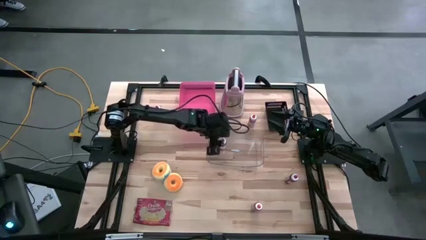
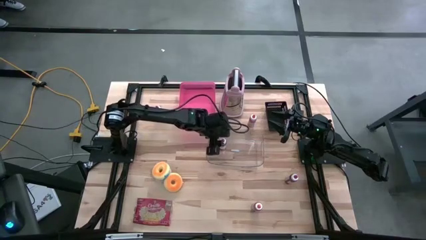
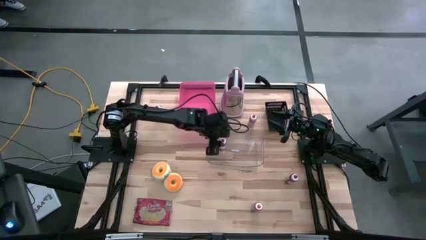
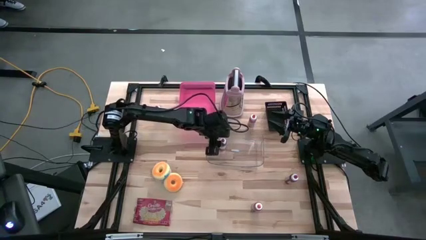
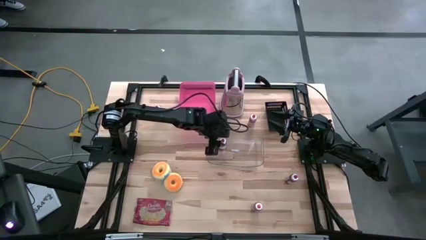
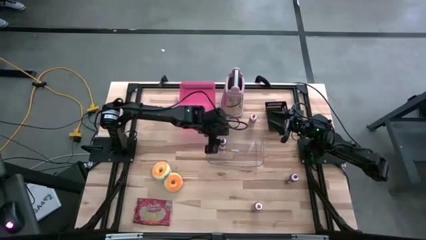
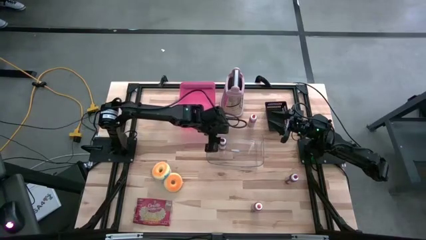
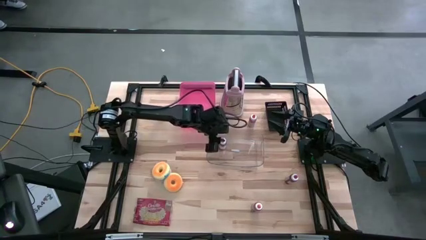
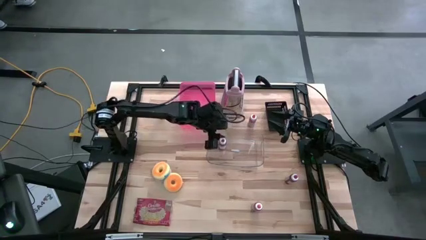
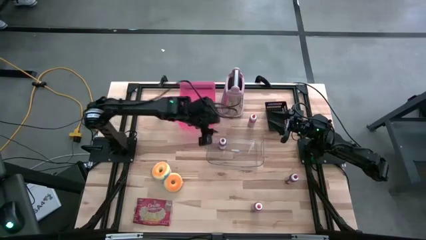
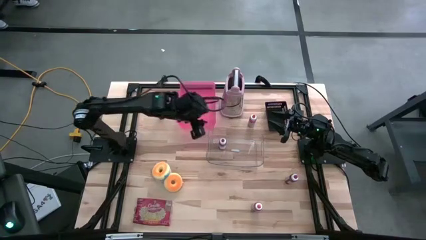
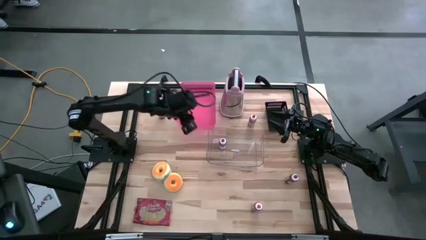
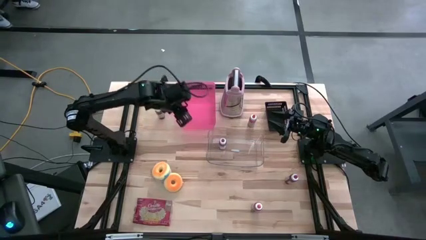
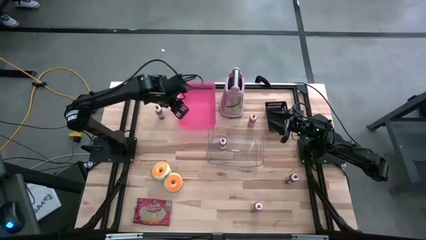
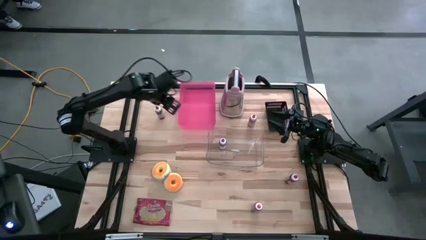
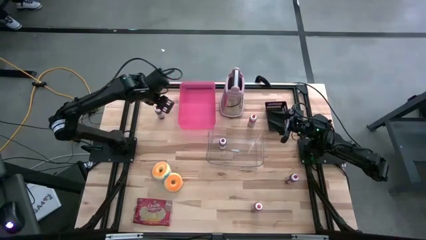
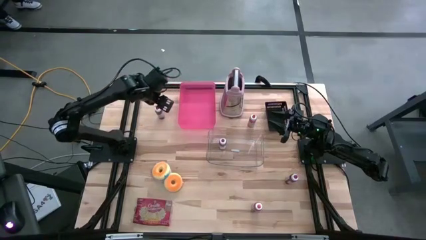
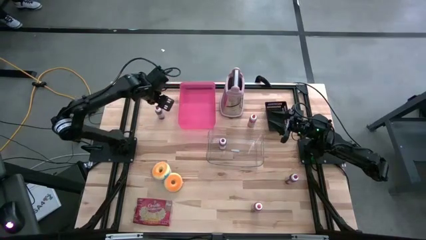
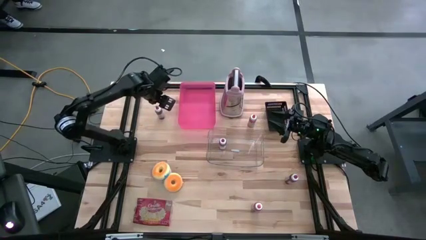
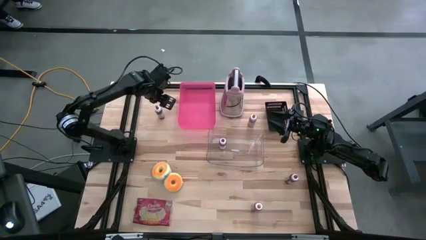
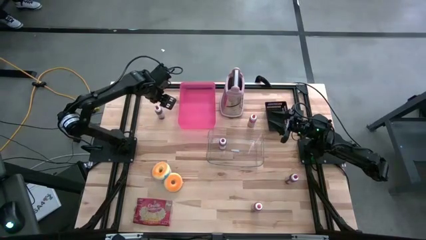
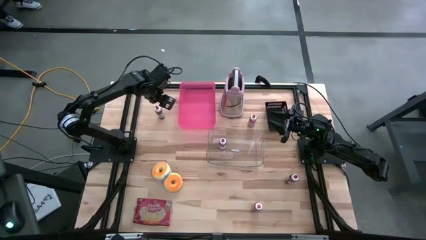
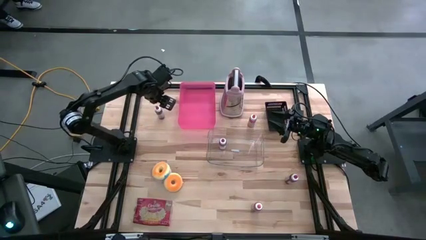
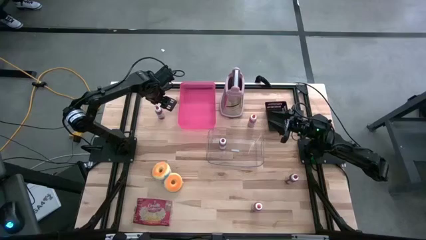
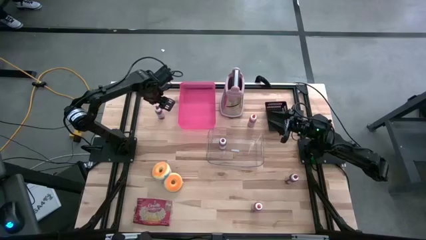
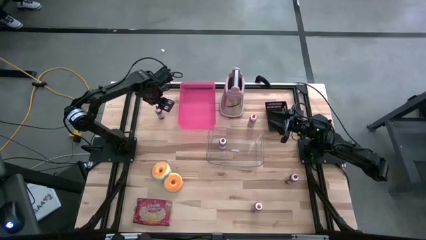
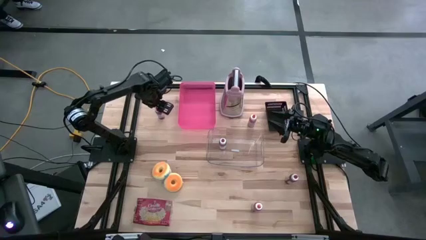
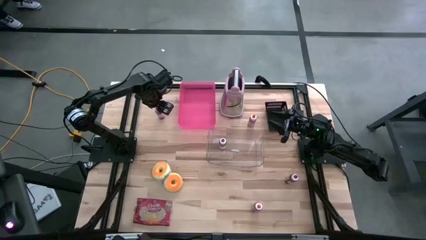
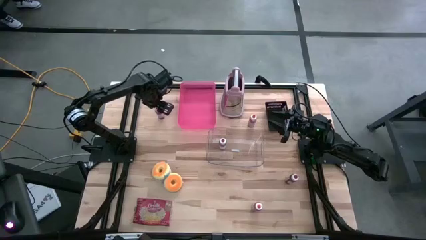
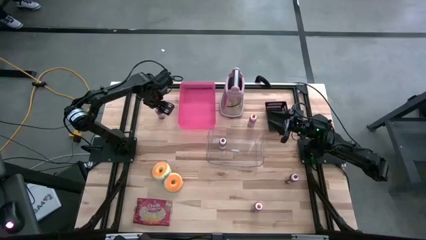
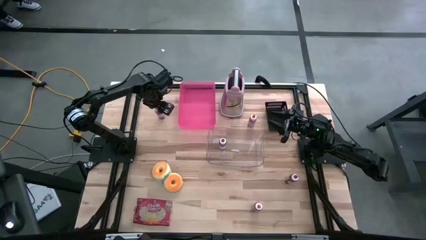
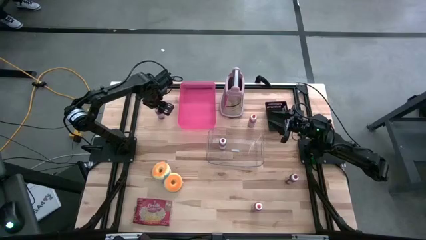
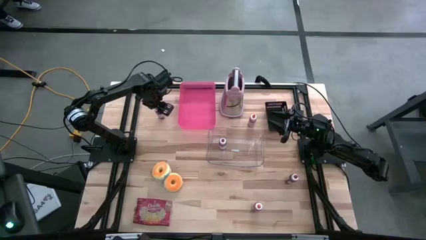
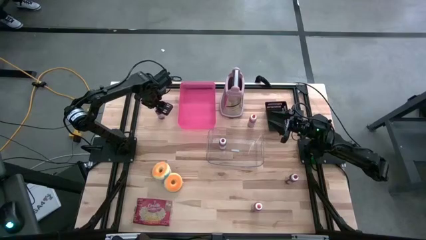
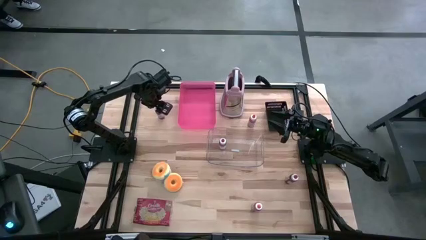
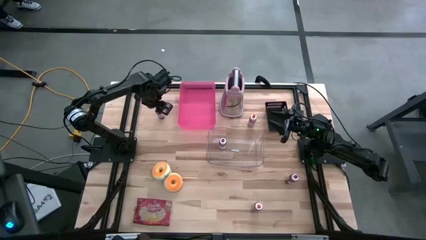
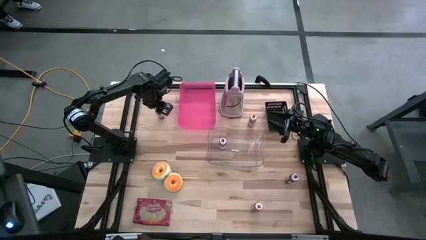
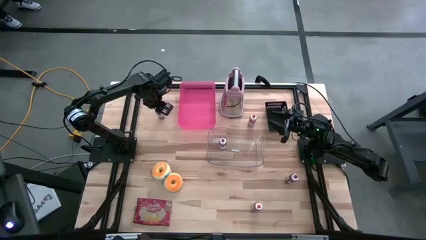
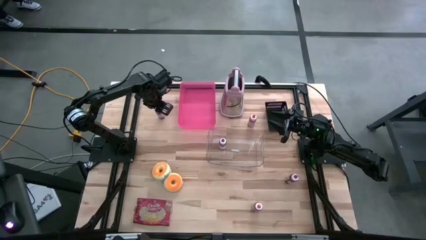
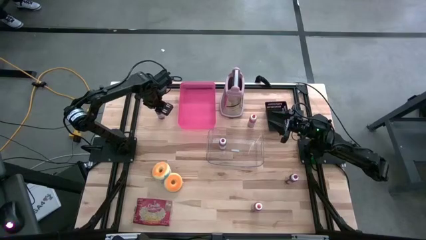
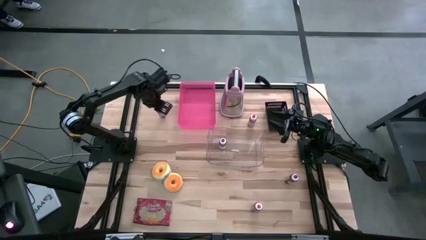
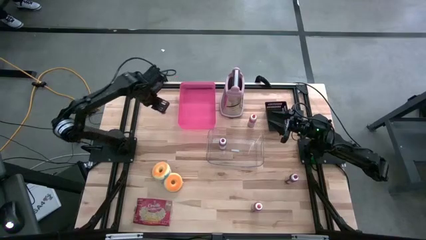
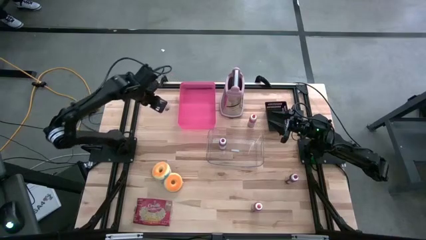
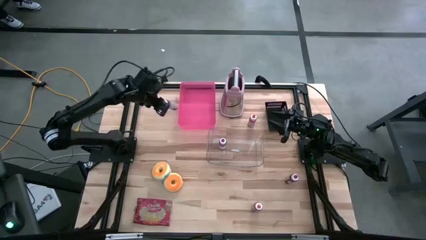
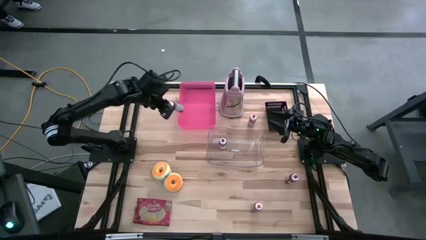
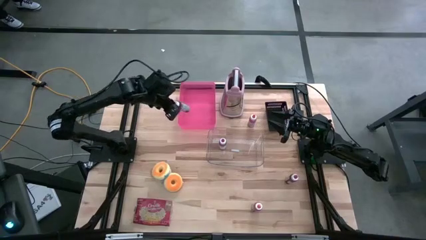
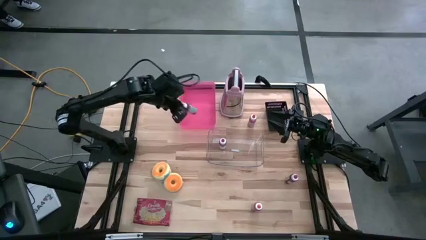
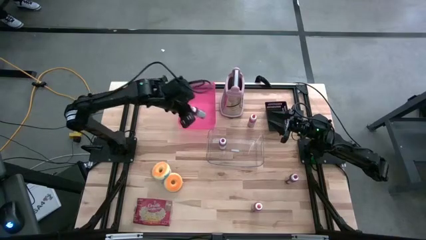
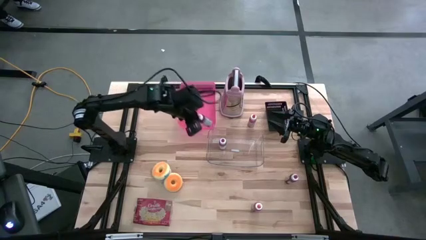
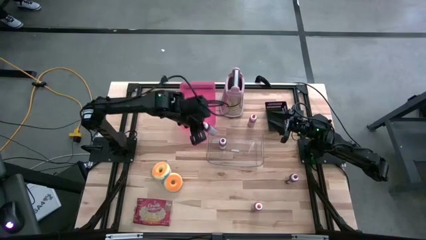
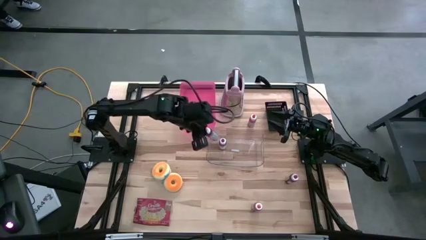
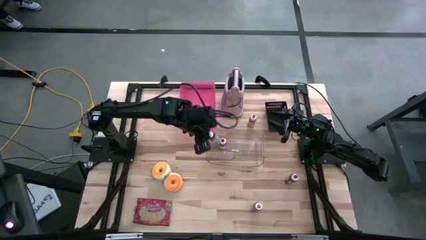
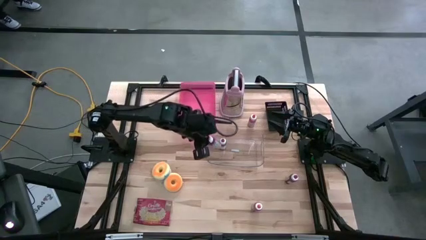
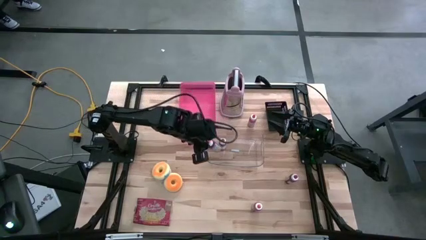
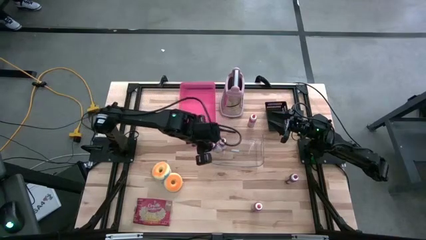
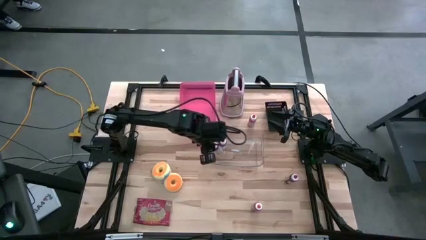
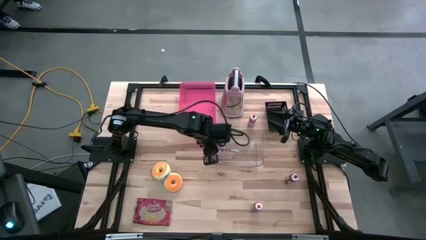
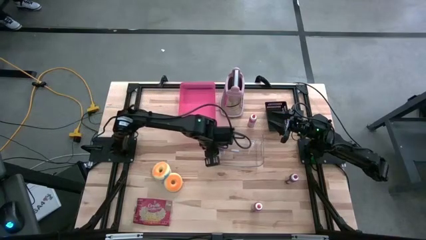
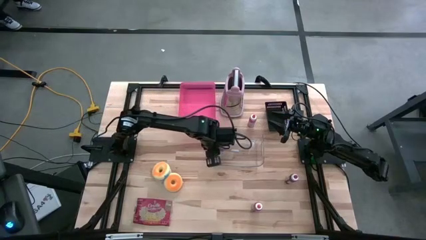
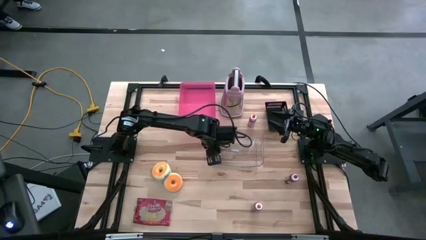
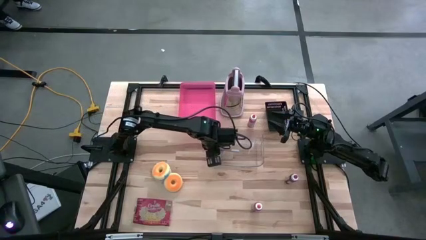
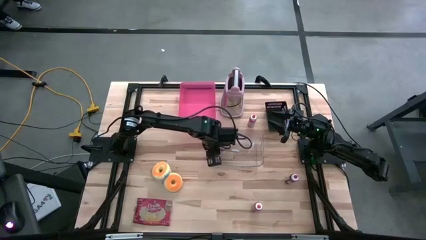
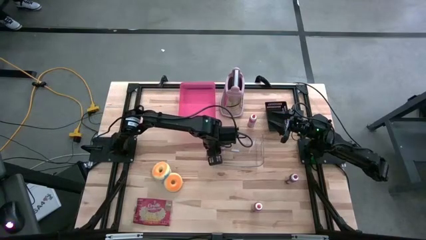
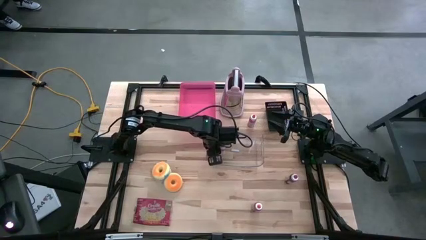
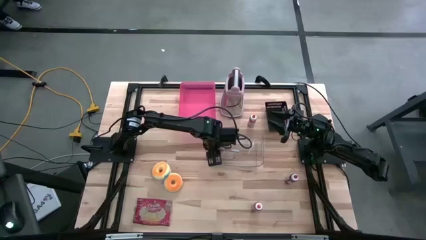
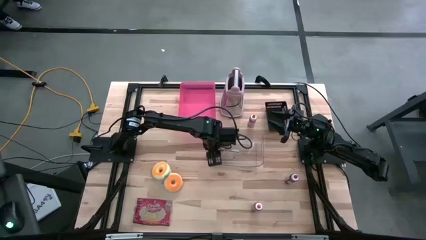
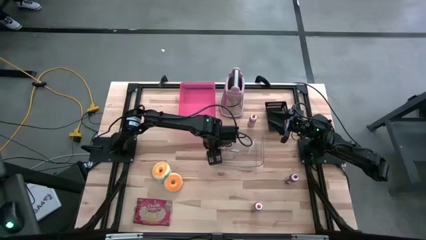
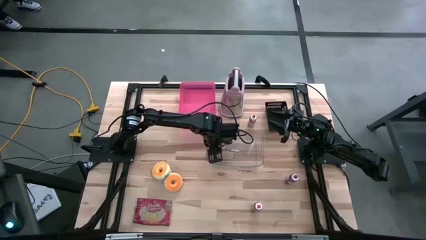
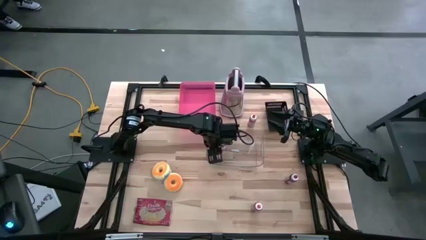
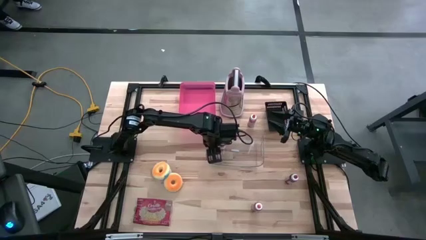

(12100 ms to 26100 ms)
Put the top red food coloring bottle into the transparent bin
